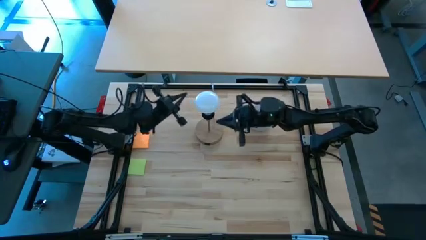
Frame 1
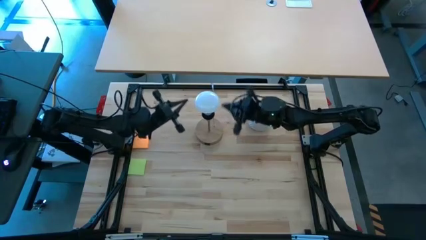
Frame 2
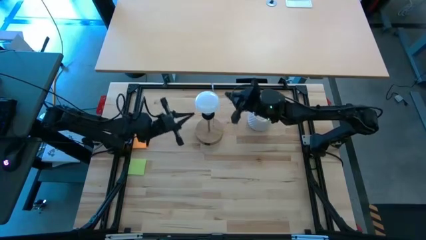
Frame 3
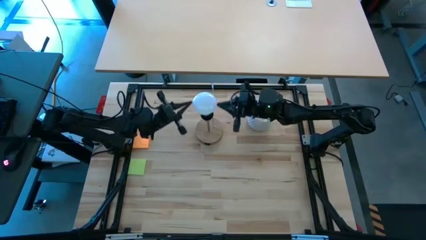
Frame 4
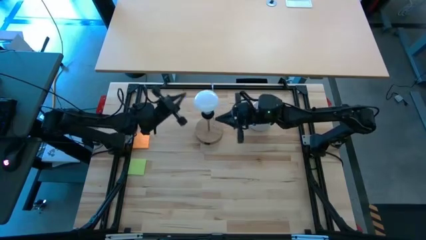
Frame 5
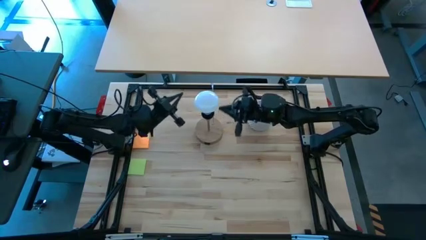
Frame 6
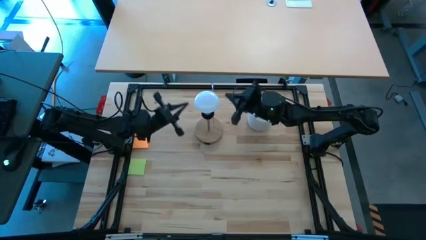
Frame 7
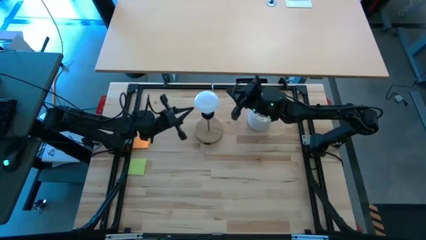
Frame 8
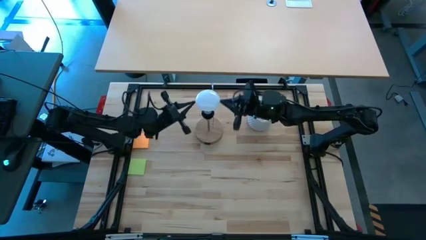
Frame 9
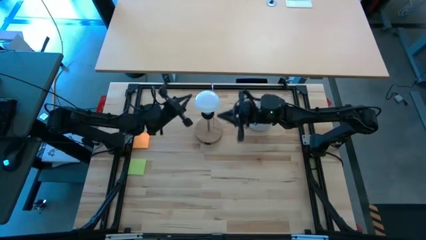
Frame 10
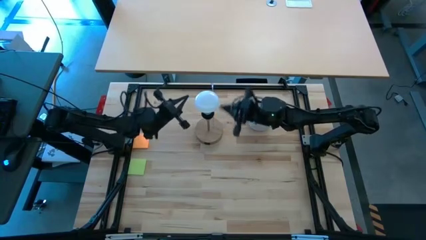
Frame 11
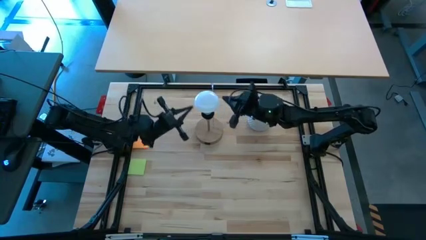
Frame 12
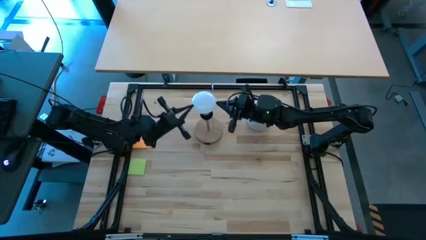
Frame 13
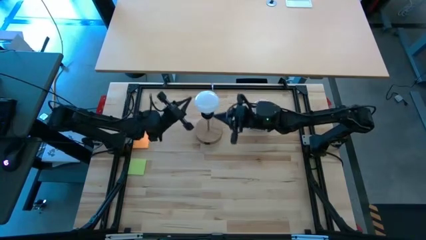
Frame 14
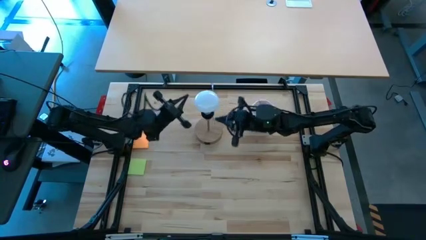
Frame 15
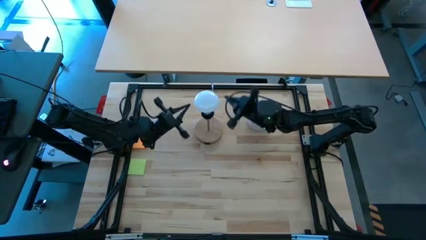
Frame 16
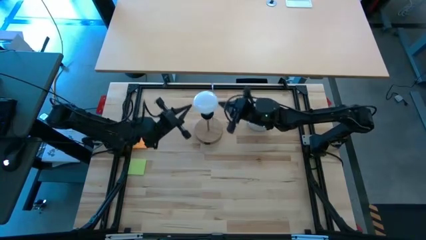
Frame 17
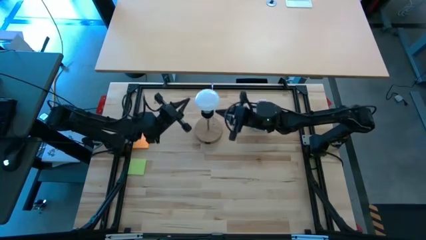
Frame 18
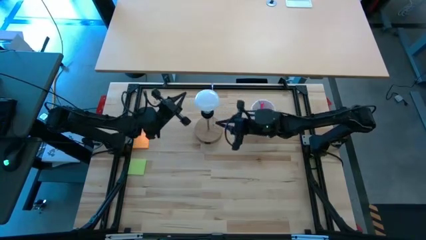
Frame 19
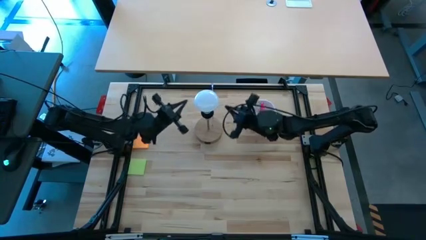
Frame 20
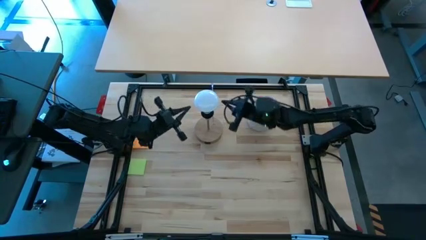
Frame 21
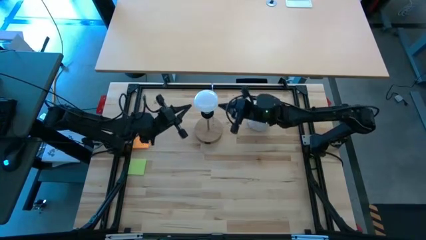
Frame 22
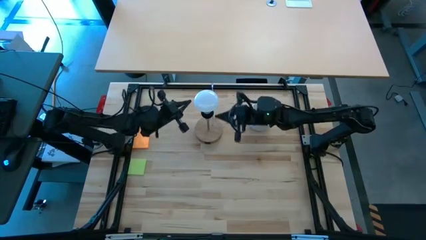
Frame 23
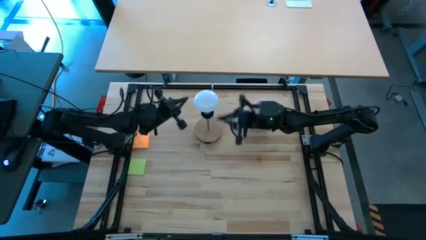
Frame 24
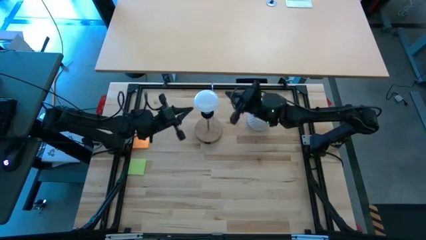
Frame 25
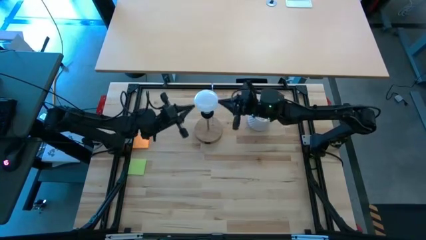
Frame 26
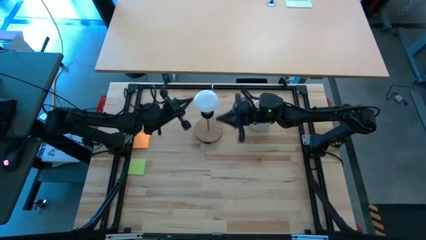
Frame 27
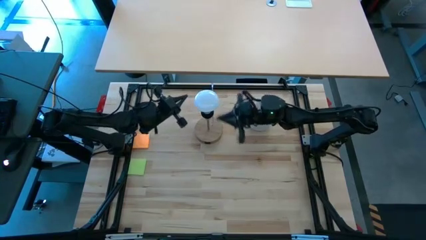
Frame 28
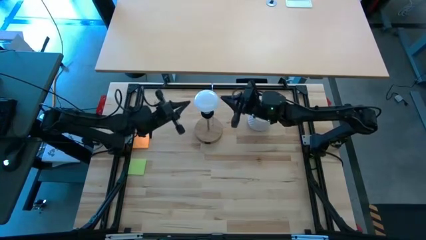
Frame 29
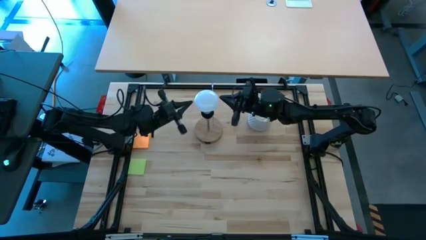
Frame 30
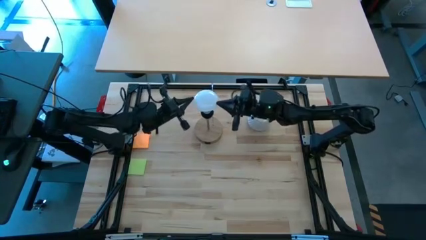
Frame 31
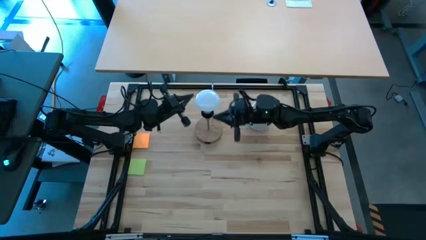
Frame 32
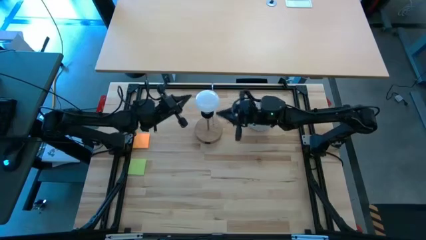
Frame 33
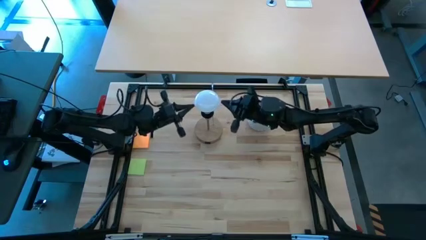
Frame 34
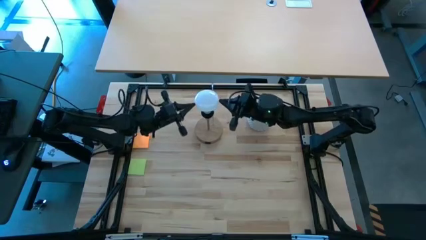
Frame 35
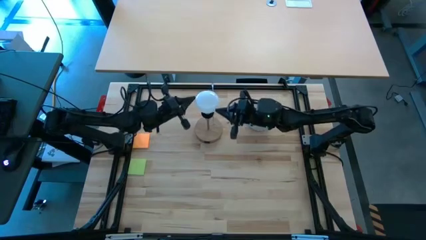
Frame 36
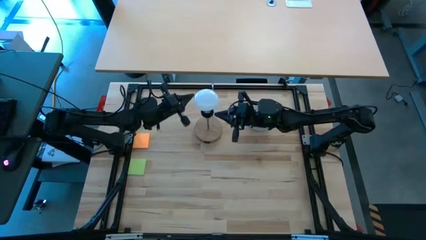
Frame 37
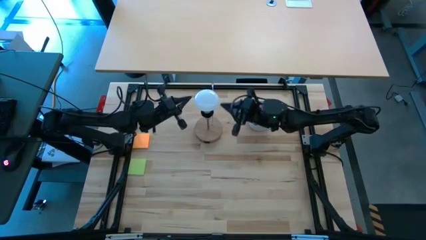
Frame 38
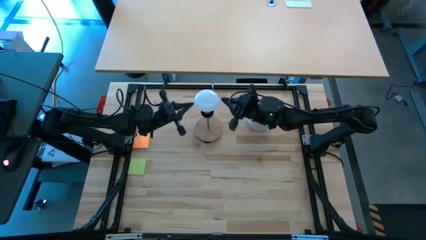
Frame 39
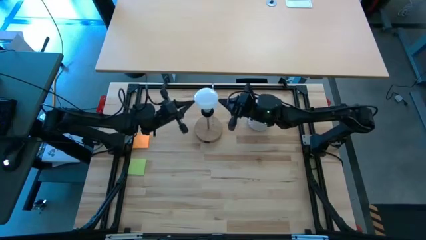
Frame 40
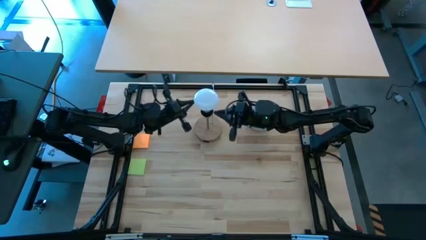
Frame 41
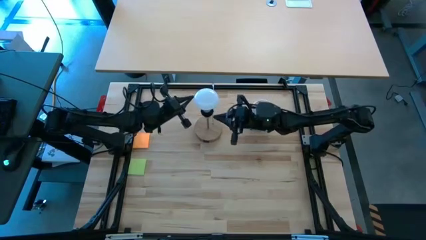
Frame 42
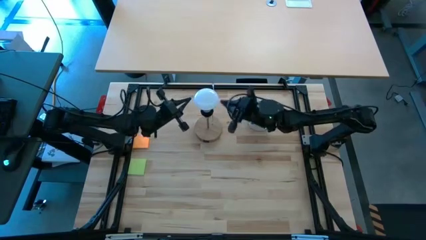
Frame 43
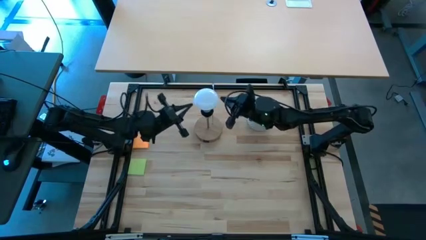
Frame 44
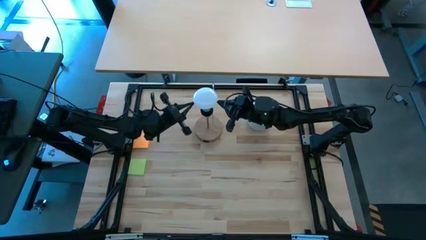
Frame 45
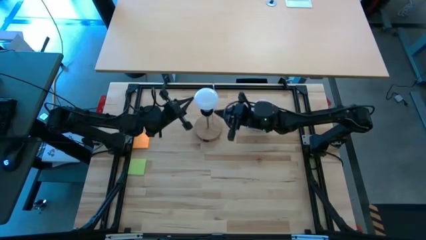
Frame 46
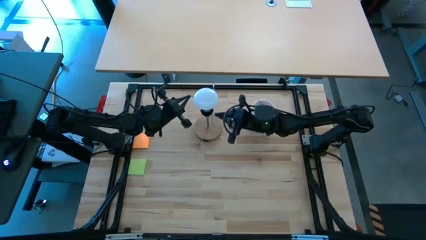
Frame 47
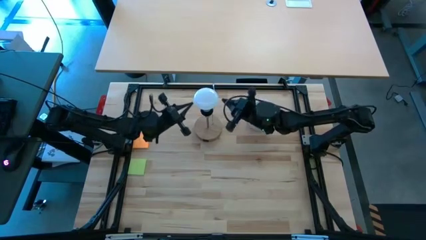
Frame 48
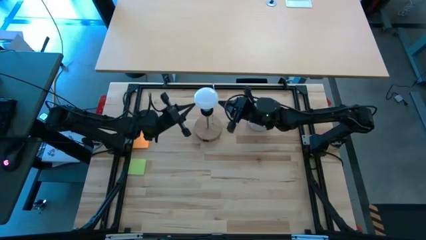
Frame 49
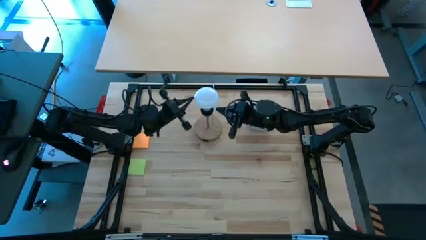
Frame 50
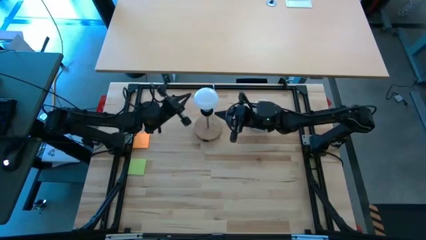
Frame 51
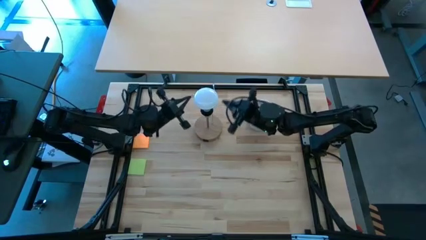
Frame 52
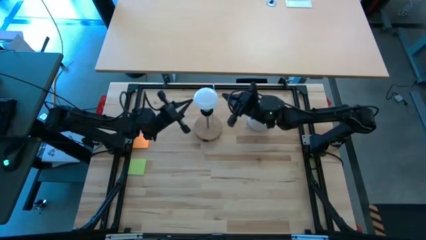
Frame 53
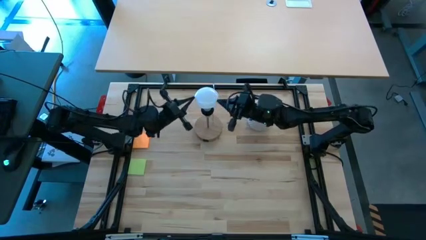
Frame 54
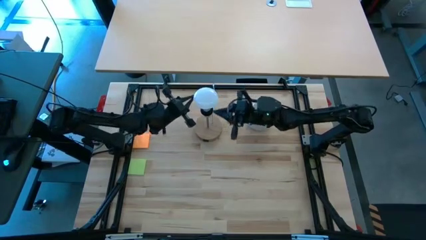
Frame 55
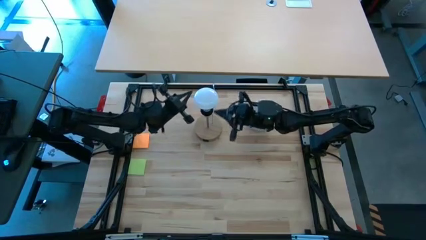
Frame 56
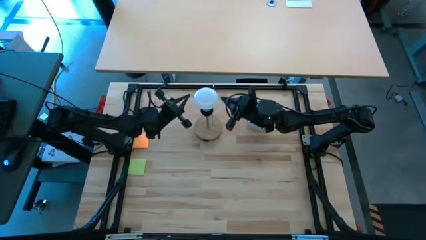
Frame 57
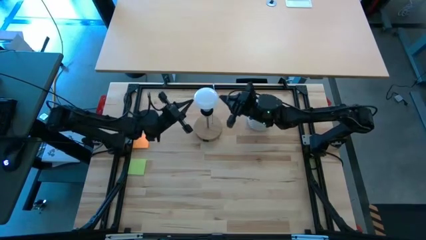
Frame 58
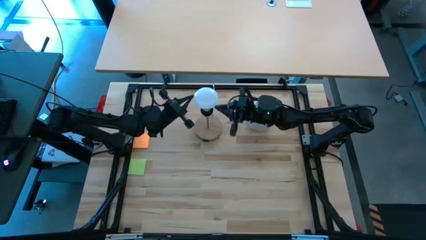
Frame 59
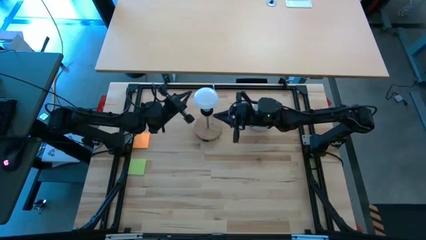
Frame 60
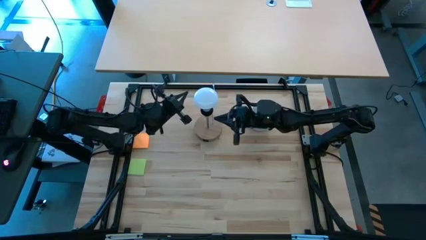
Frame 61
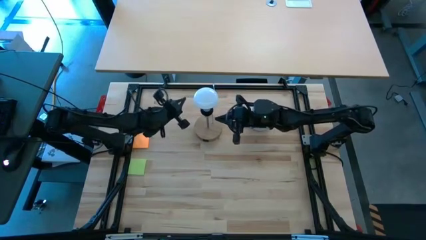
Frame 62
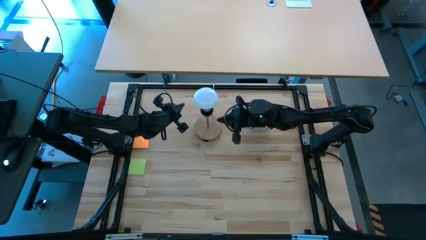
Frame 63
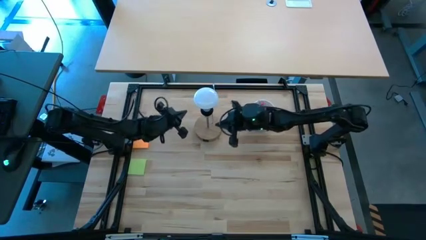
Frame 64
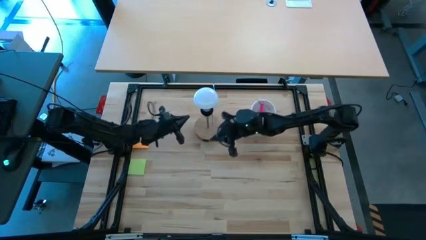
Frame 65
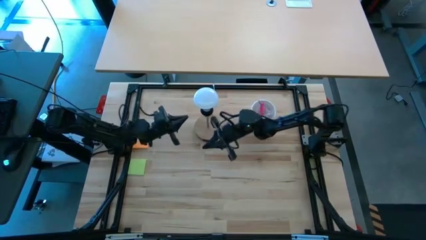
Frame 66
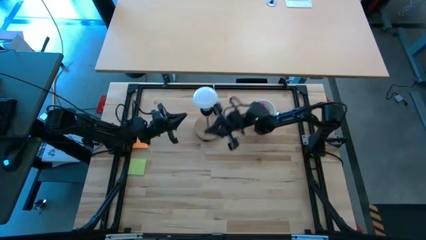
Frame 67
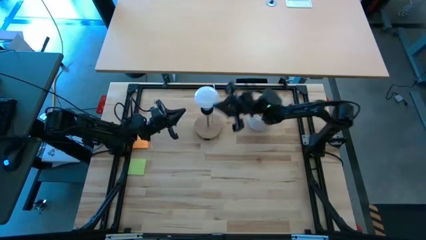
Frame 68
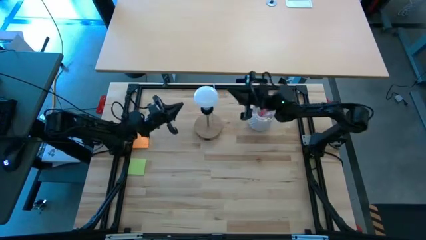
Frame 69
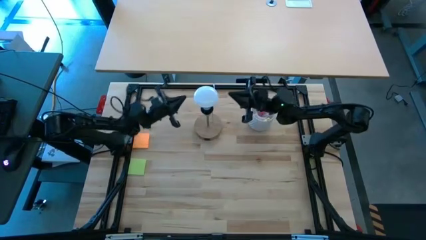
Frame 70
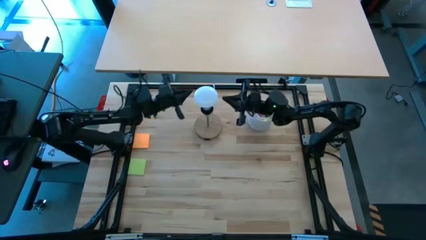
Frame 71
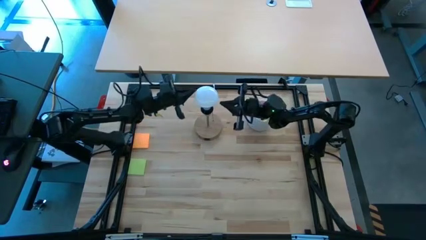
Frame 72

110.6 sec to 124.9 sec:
Task: Screw lightbulb
Insert the light bulb into the brown lamp
